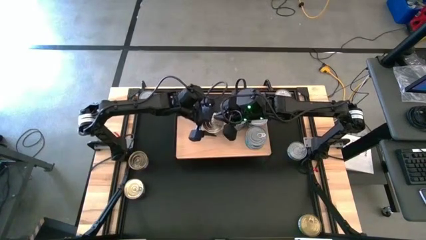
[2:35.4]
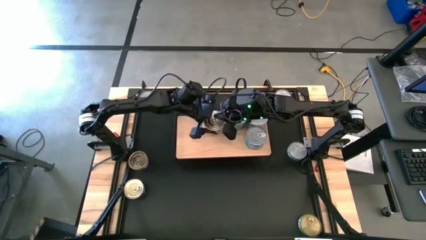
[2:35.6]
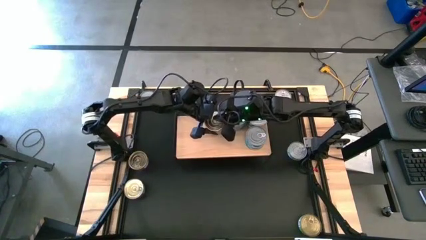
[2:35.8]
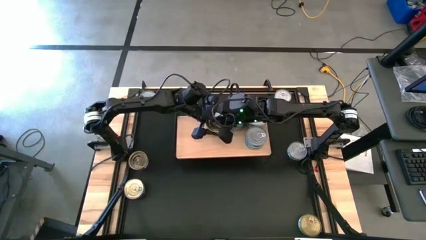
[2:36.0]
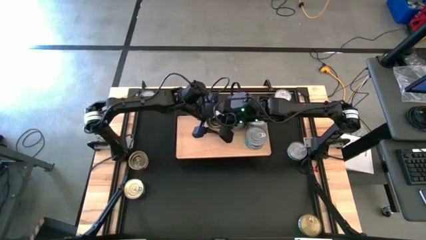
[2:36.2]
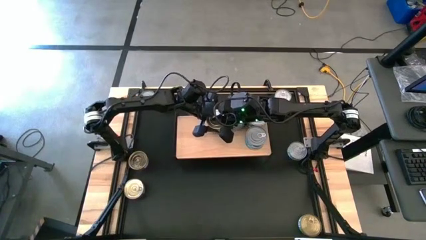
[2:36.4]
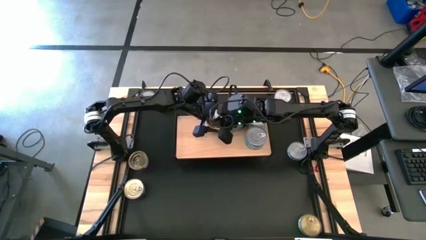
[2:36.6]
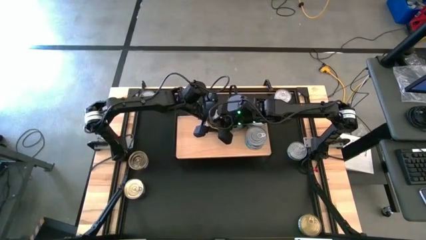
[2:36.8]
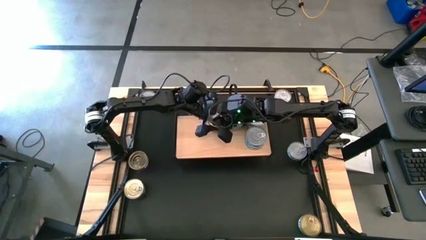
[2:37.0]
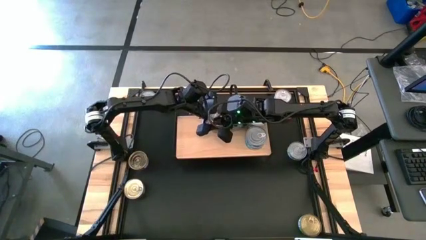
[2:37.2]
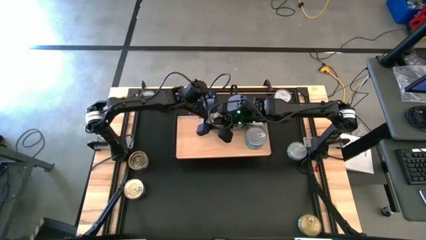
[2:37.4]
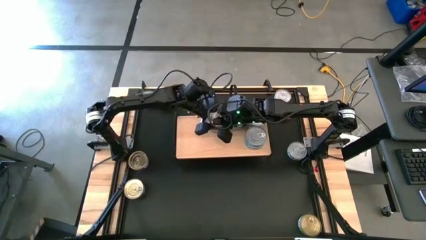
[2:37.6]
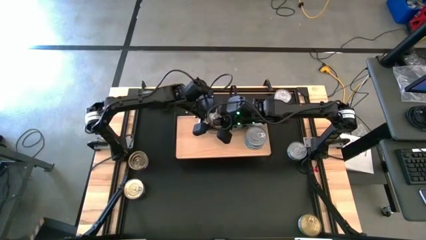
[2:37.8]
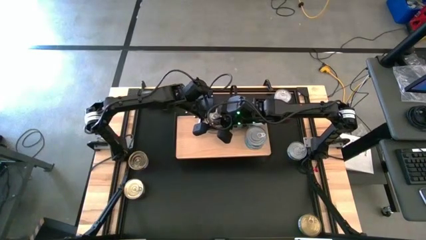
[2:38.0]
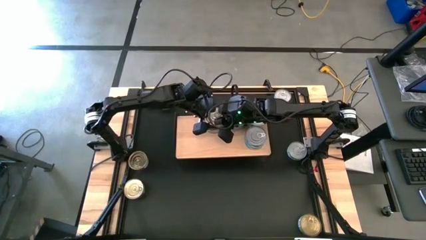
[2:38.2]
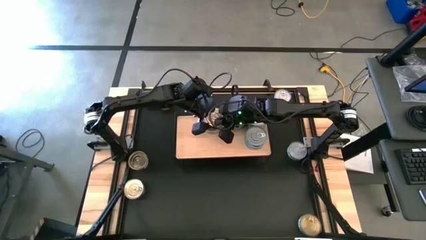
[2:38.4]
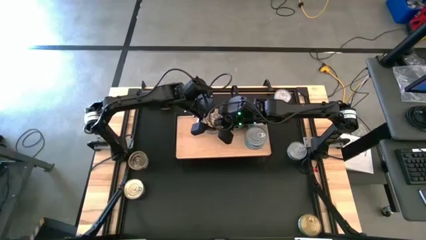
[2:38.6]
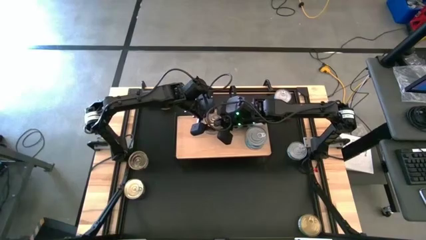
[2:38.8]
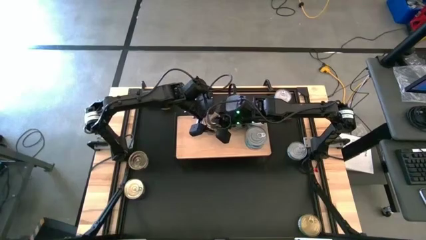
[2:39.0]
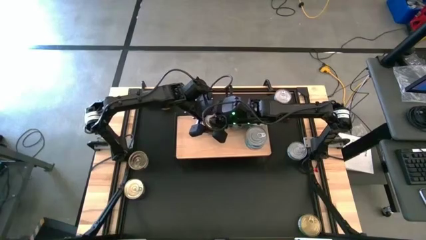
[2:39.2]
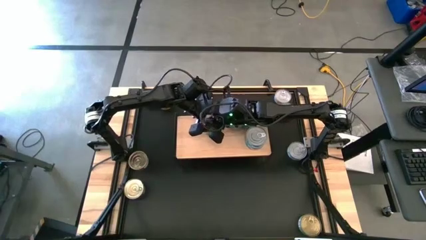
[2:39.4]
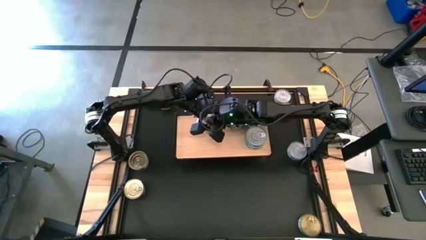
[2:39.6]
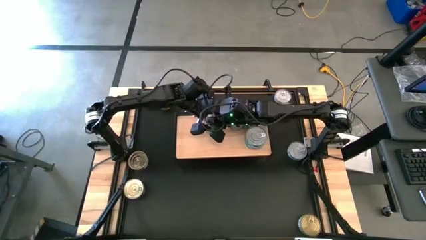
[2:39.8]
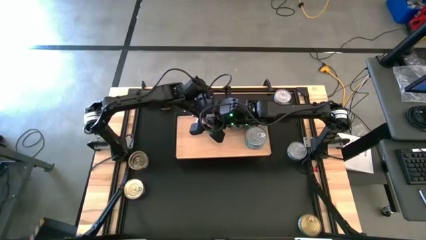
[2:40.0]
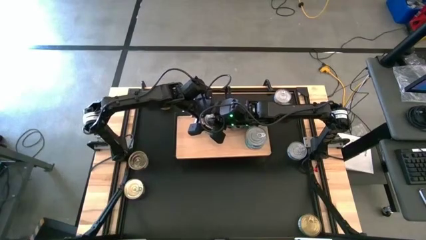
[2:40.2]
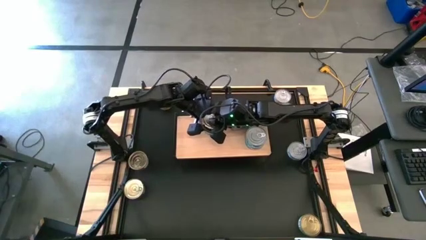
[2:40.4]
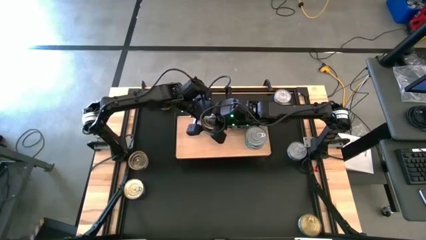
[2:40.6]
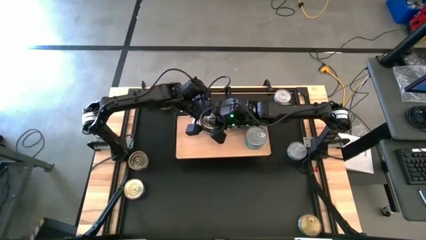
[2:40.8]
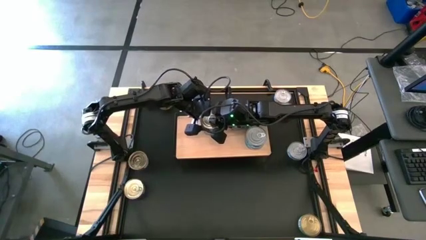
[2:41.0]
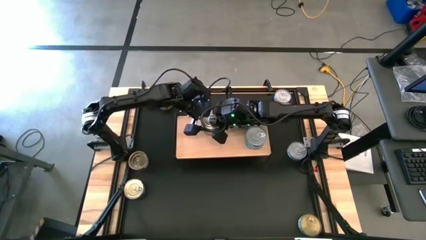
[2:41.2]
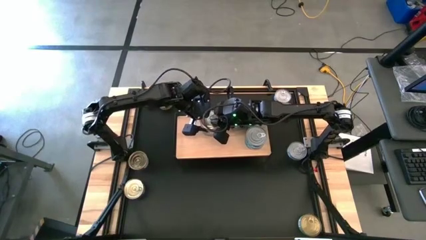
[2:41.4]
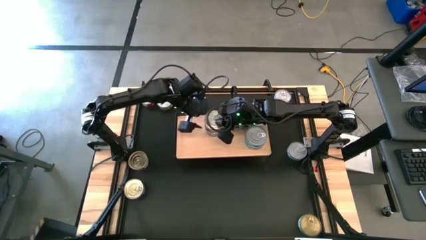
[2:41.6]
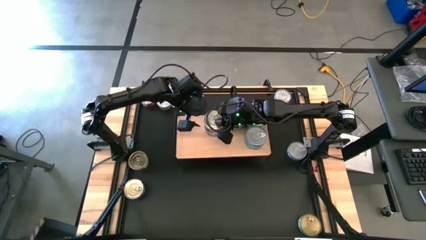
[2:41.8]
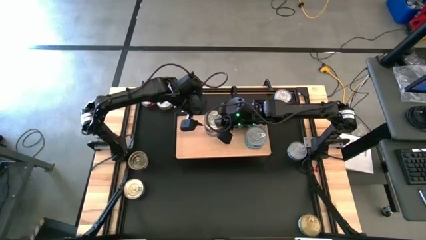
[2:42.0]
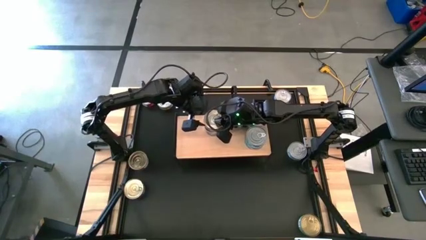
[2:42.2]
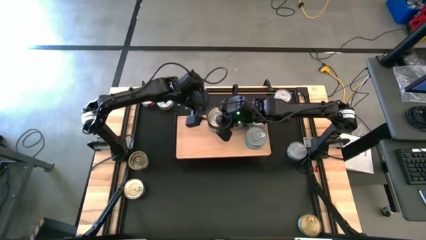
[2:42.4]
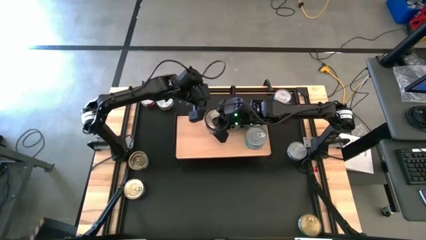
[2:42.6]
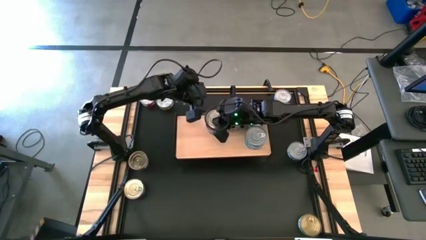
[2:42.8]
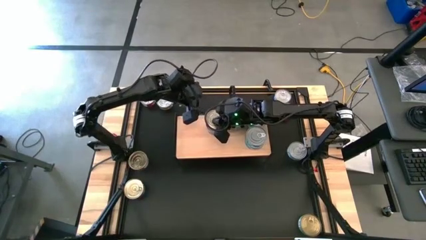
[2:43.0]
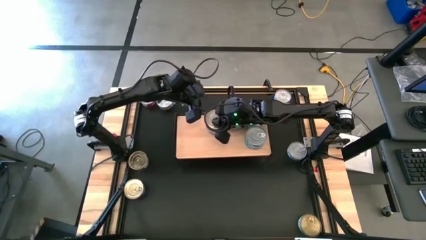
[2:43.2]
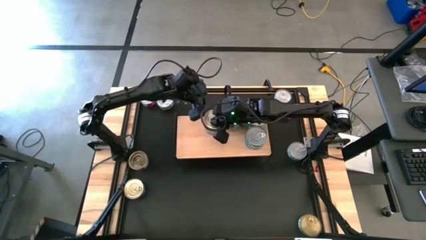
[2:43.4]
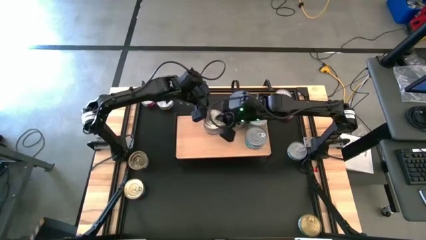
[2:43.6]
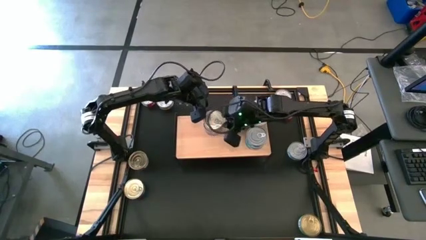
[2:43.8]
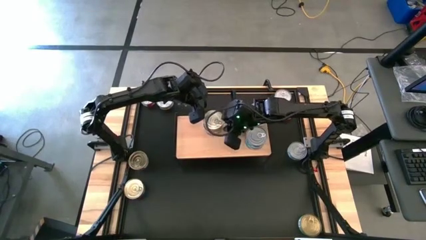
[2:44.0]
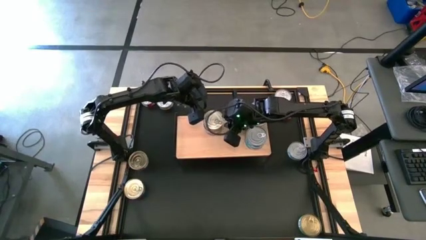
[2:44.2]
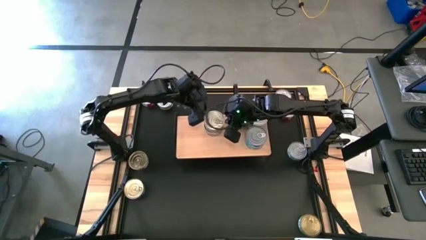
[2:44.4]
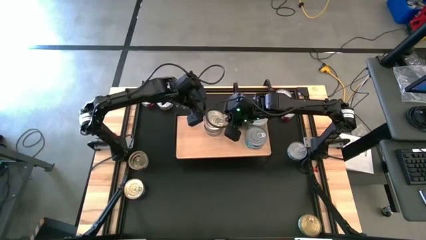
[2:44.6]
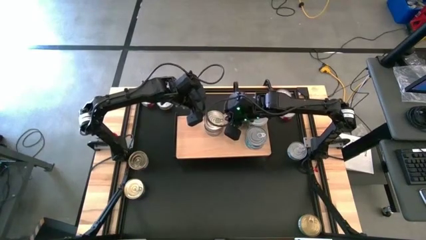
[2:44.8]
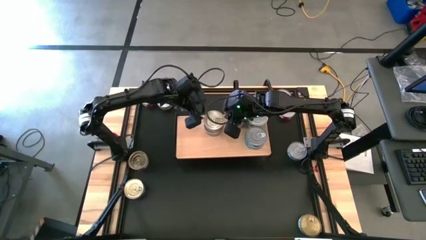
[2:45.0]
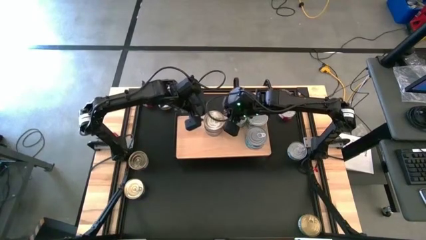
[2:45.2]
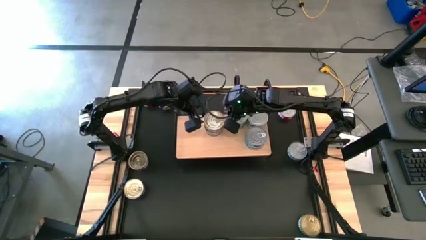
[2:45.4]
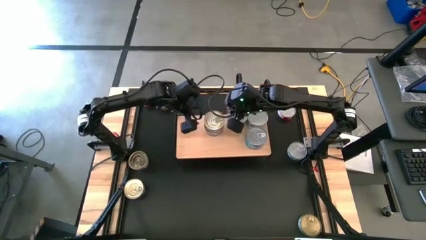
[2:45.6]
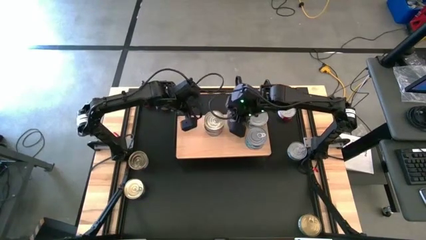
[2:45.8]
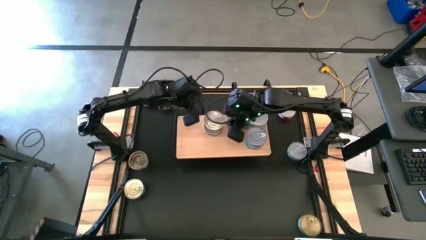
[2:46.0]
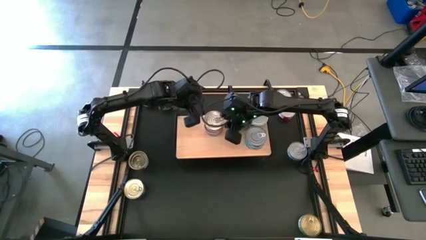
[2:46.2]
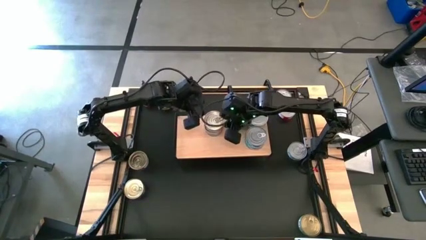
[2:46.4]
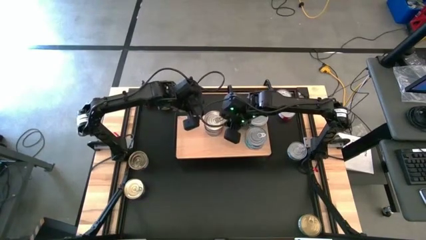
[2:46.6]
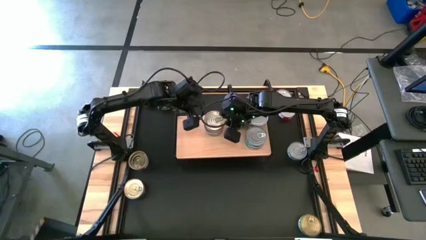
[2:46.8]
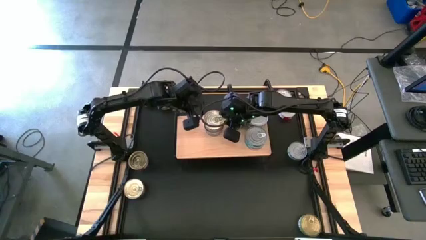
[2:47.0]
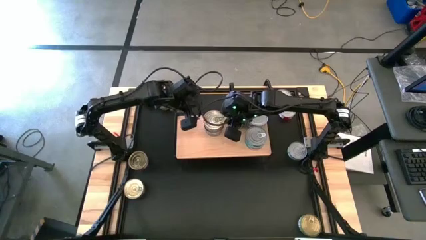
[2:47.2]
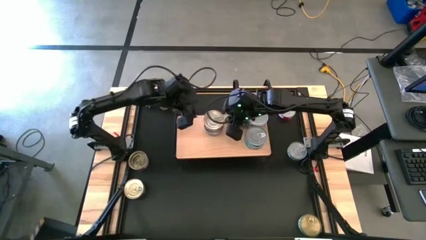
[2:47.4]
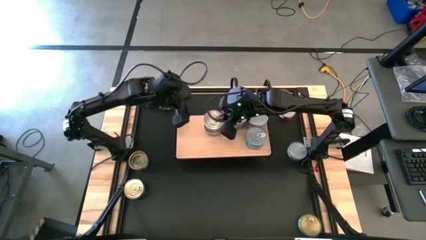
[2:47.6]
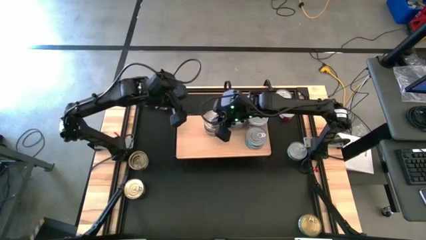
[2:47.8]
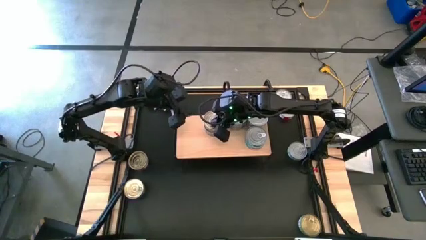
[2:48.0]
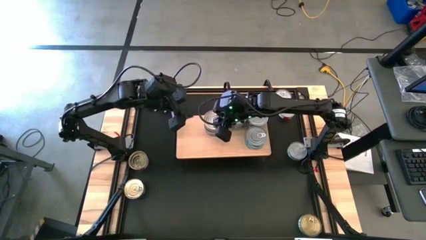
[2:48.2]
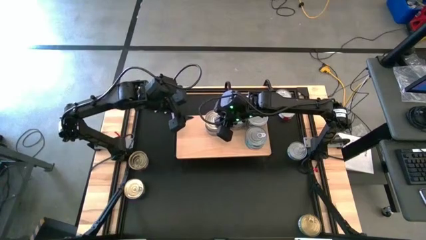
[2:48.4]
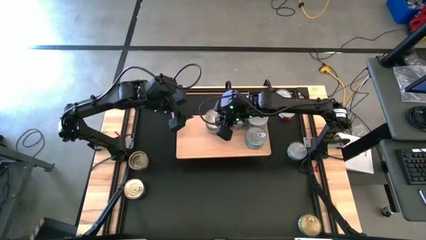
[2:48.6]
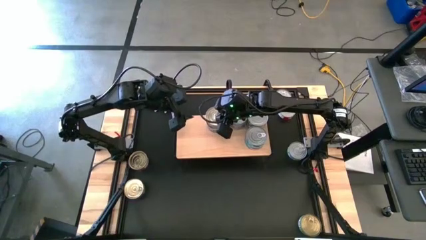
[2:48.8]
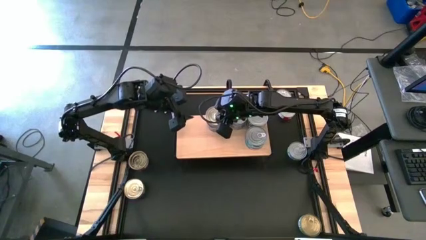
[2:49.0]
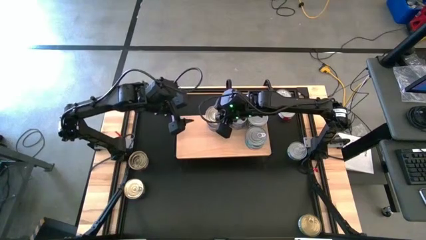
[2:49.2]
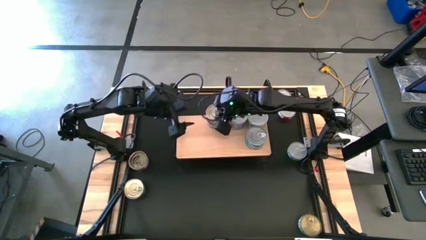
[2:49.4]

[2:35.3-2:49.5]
Task: Stack canned seafood by type on shelf
Stack the blue pink tuna can on top of the blue pink tuna can on the shelf

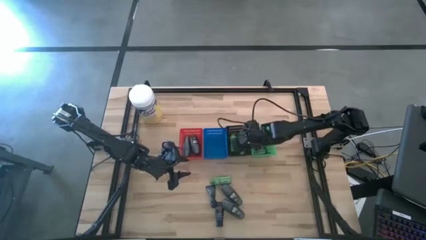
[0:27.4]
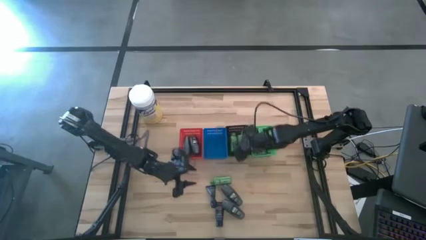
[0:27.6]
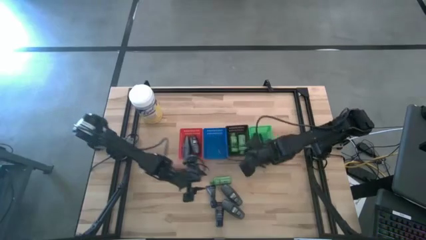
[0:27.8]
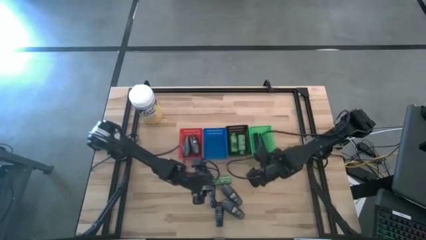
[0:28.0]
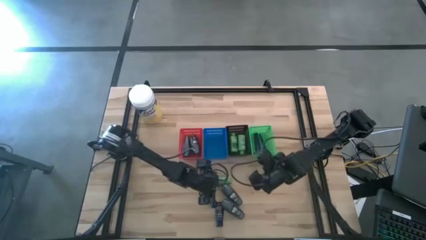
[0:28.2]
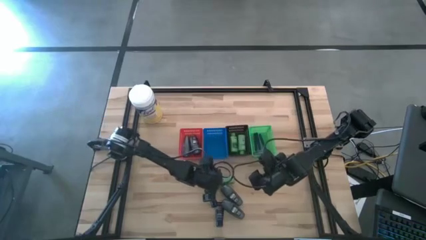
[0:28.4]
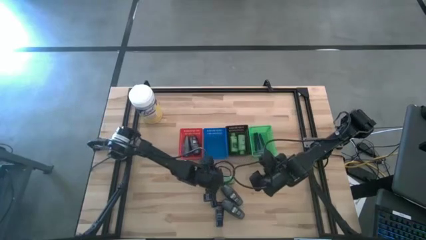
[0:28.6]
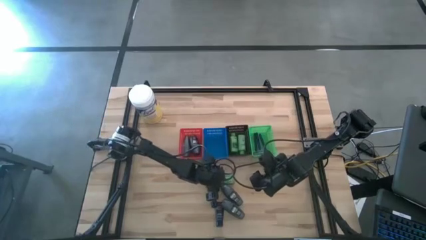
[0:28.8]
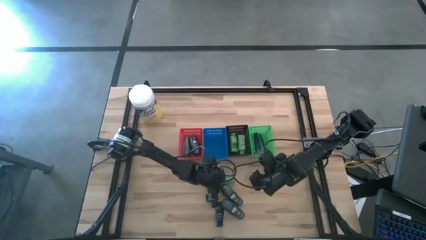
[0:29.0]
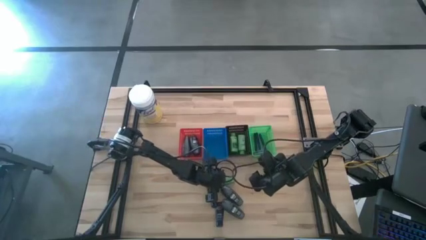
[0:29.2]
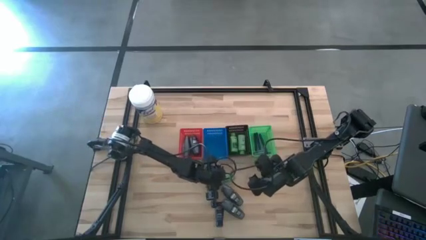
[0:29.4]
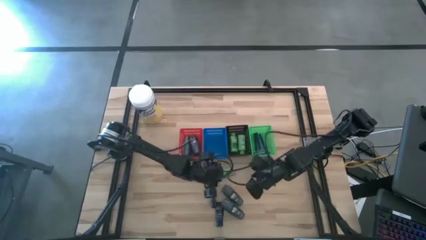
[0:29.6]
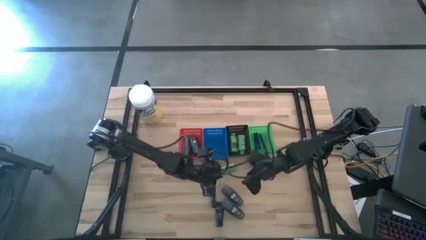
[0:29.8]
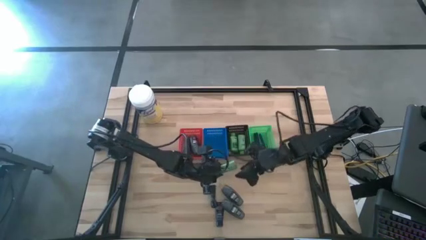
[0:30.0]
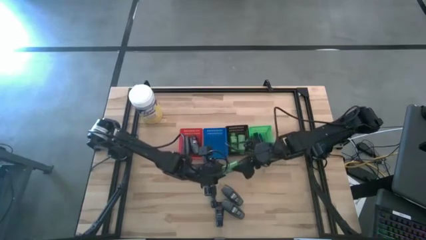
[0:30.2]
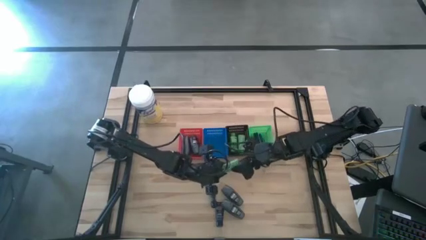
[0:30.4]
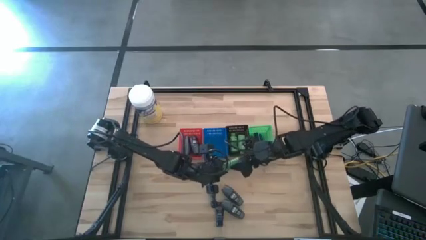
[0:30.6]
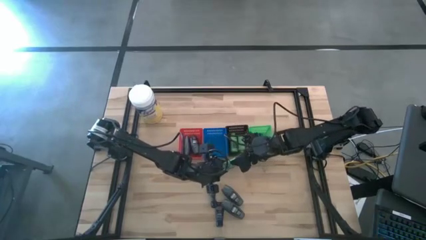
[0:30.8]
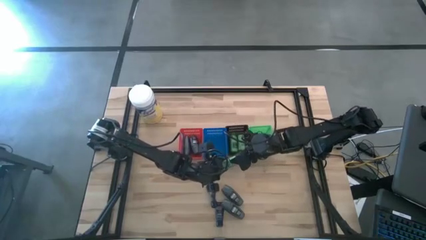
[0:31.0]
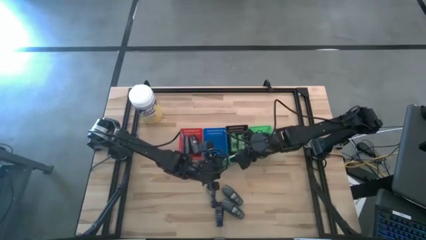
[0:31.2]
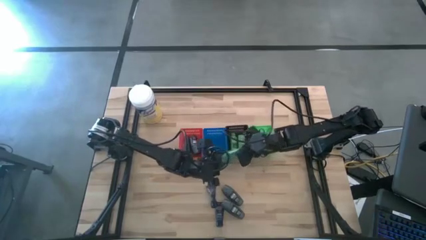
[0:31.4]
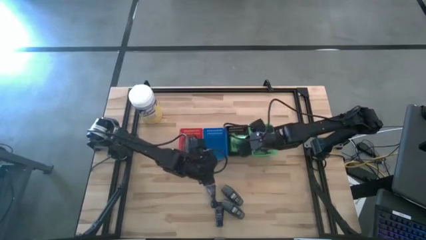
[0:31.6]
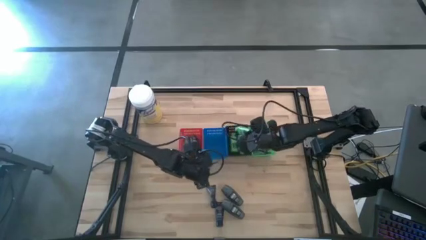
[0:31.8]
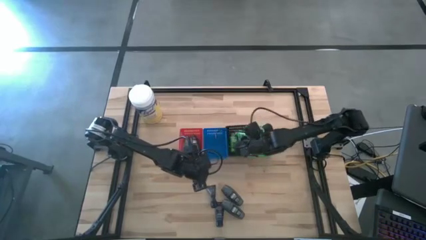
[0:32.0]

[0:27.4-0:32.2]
Task: Pick & Place Travel size toiletries
Put the green shampoo into the black bin
